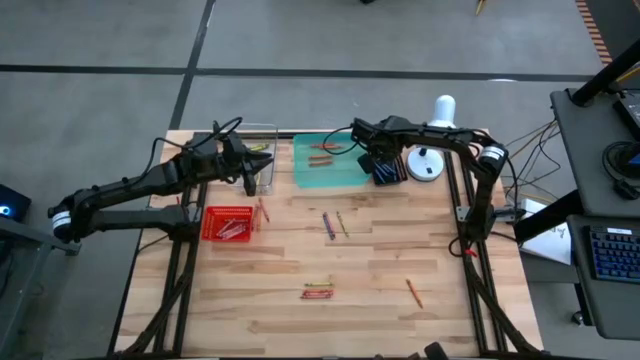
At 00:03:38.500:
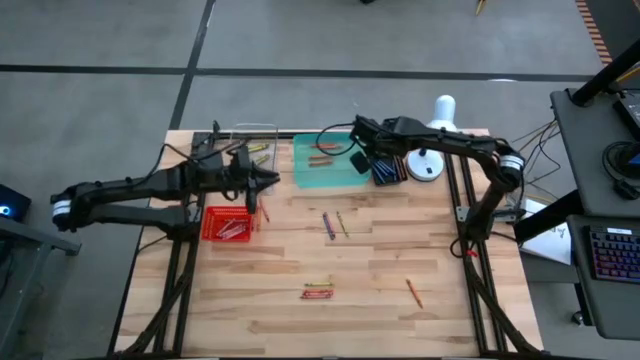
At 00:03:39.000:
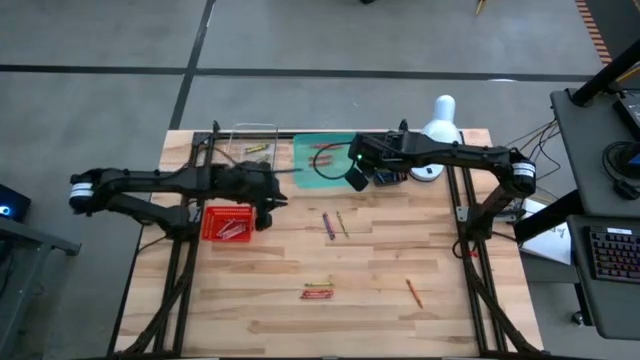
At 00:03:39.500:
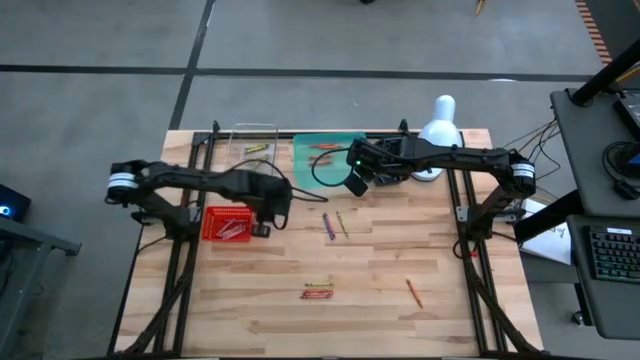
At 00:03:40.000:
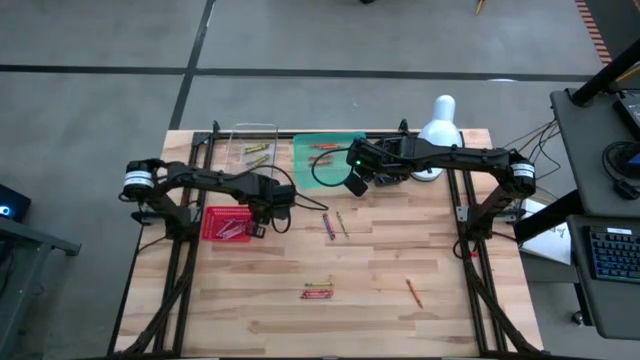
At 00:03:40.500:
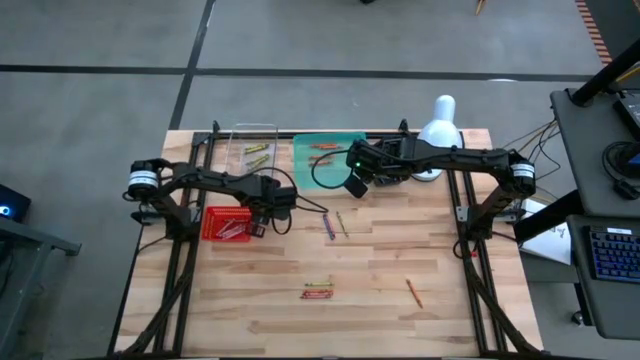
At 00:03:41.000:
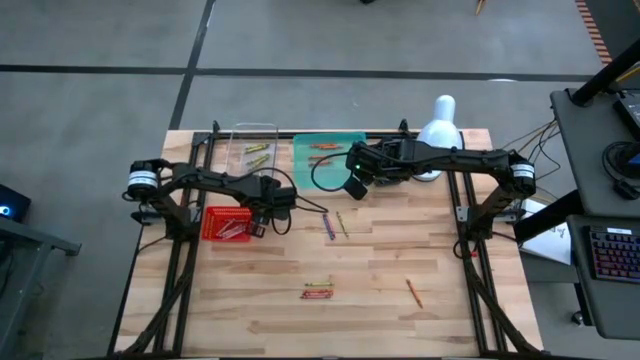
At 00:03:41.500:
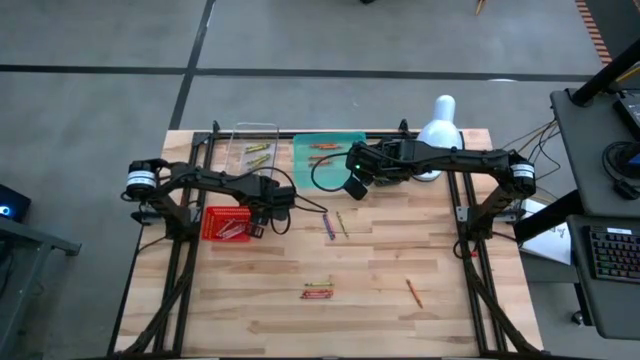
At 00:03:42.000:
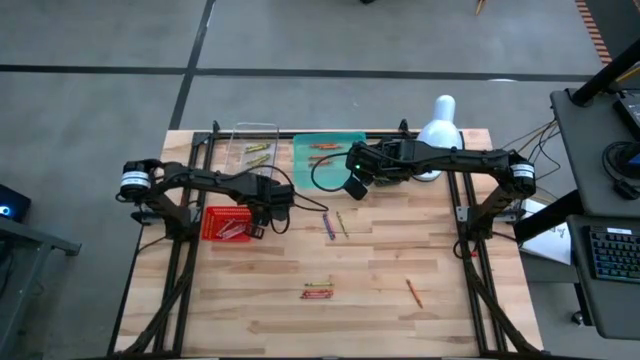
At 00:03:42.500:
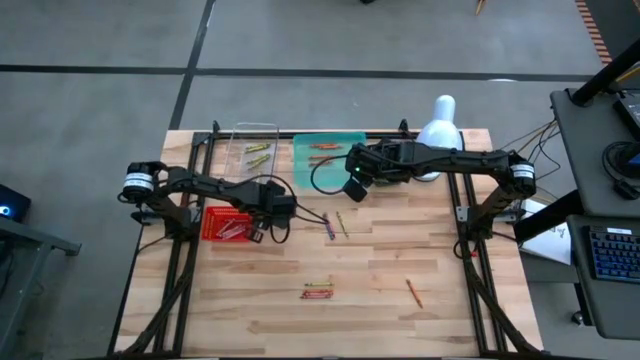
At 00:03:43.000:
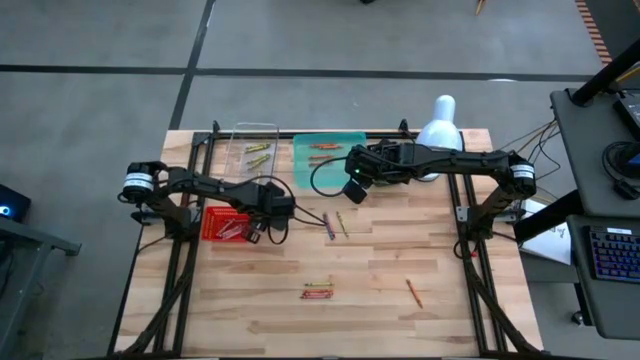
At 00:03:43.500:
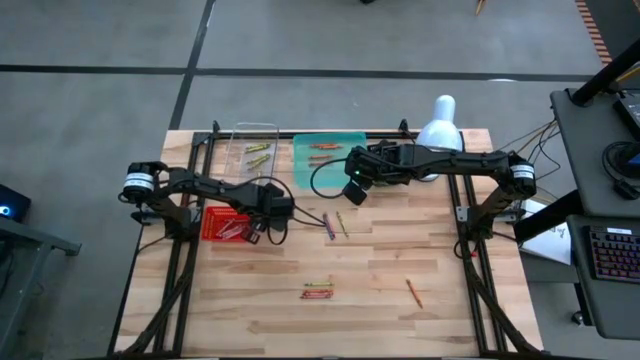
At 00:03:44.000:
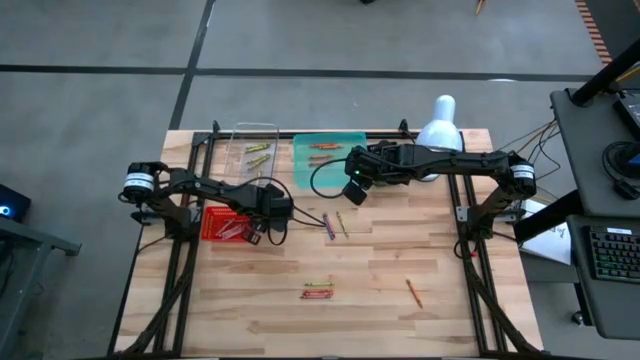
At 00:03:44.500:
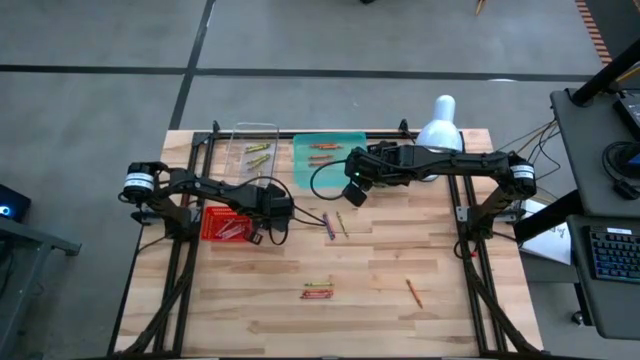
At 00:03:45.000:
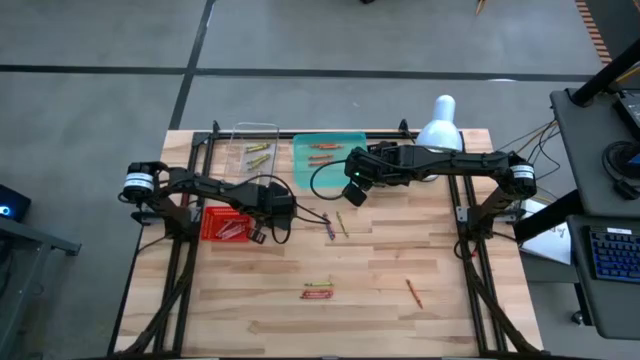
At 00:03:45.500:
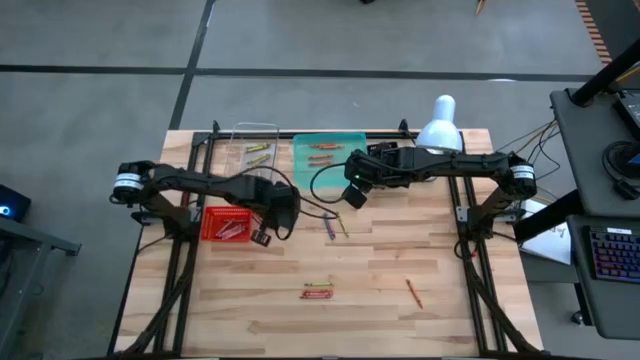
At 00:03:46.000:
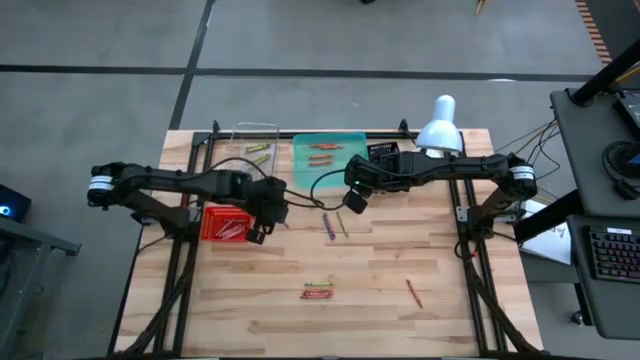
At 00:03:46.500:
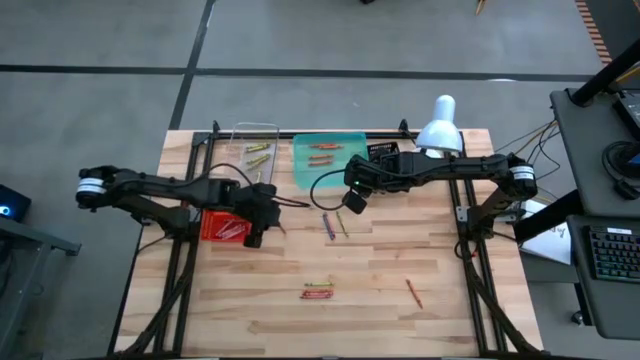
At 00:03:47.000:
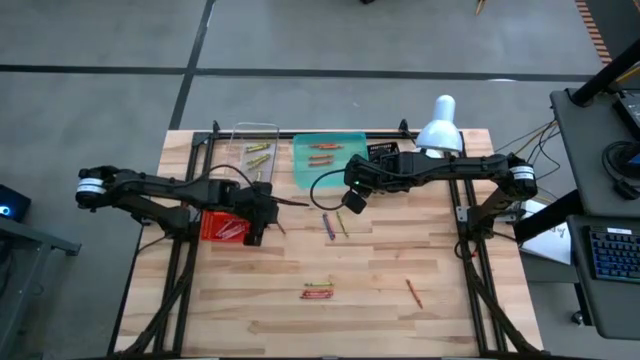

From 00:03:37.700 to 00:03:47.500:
Task: Sort crayons
Put the red crayon into the red bin

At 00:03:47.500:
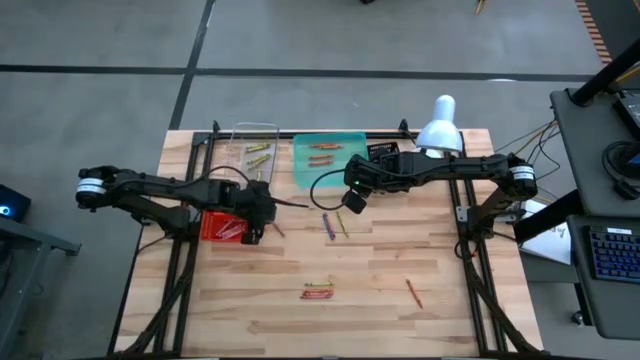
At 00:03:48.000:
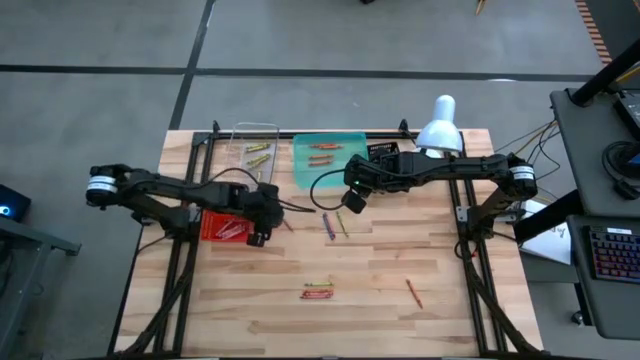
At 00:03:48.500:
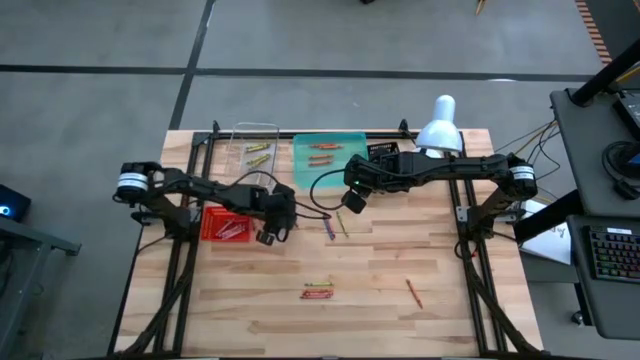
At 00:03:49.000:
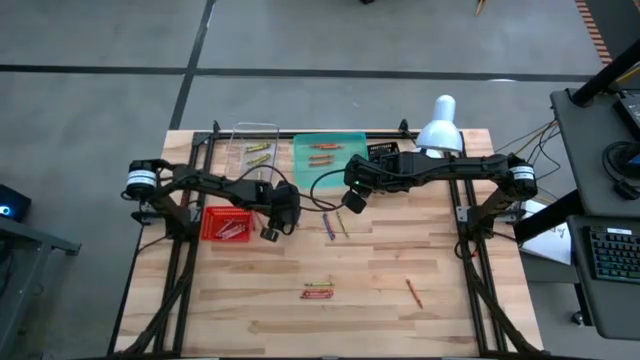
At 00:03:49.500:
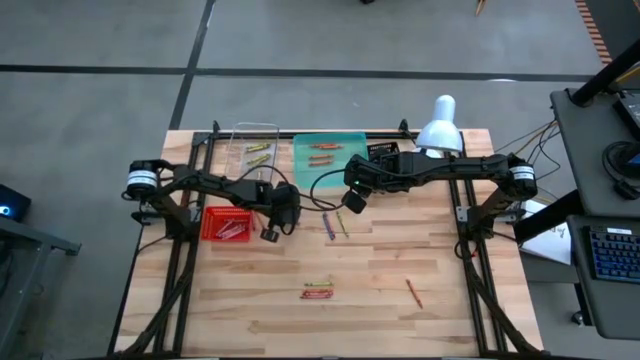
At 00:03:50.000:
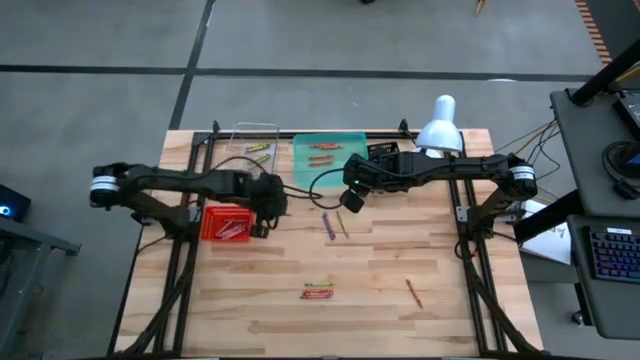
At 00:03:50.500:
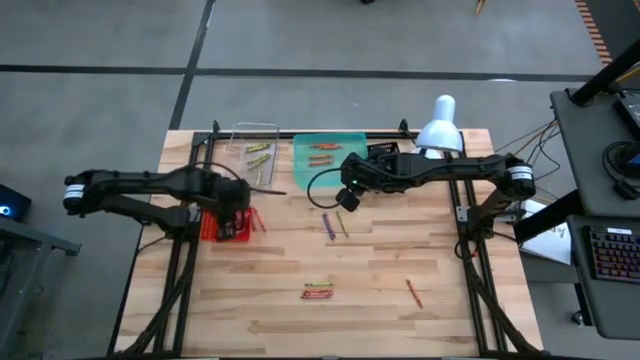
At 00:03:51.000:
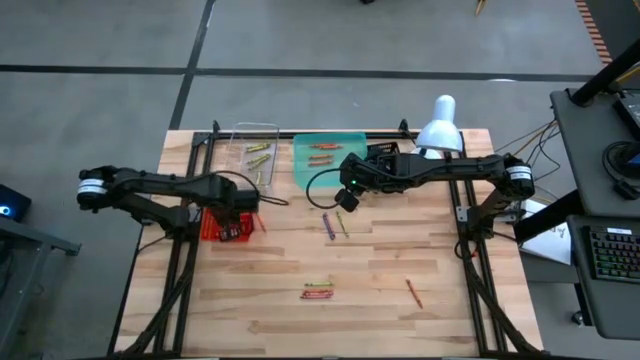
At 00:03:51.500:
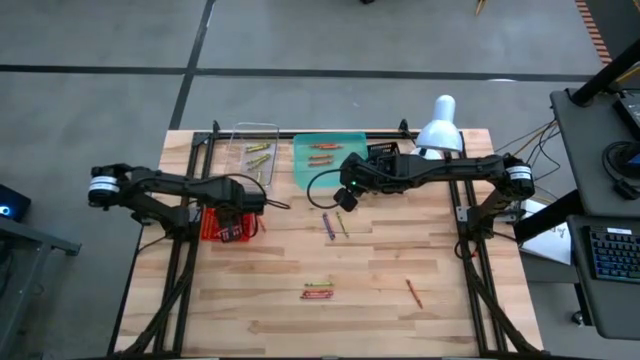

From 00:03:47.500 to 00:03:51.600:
Put the red crayon into the red bin

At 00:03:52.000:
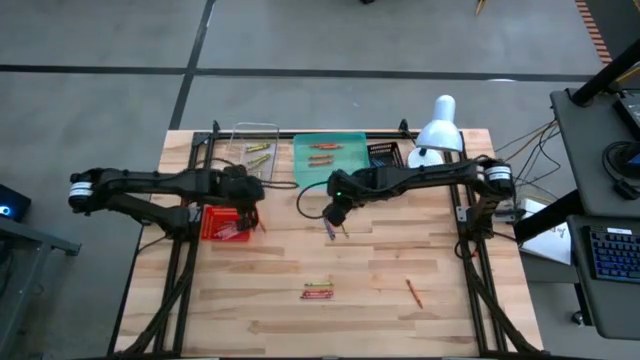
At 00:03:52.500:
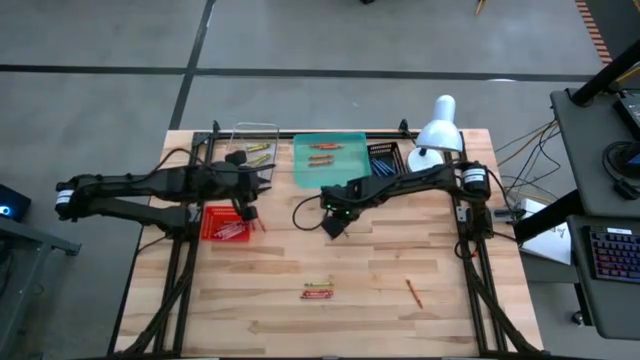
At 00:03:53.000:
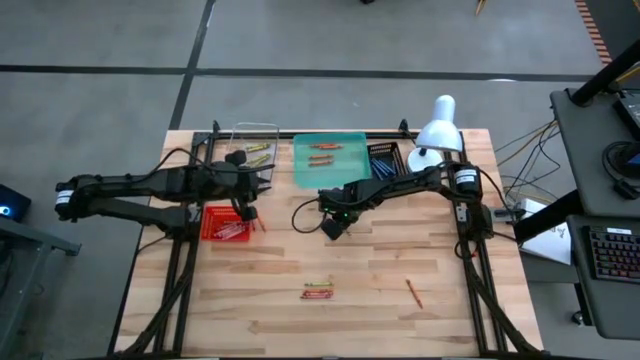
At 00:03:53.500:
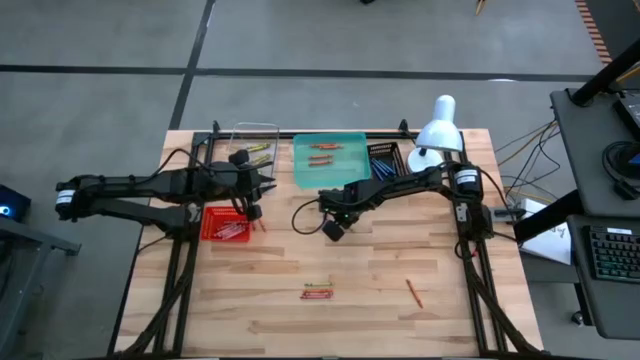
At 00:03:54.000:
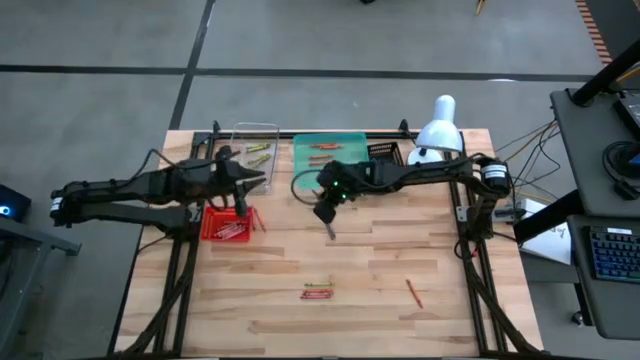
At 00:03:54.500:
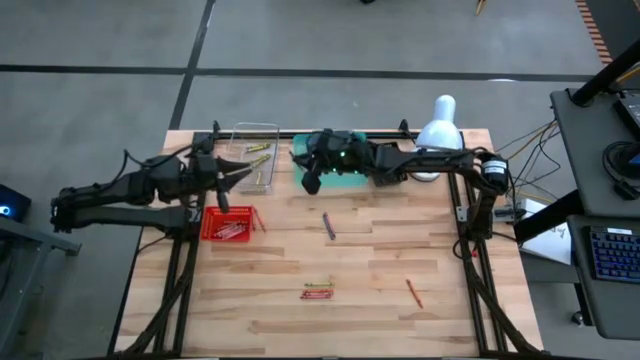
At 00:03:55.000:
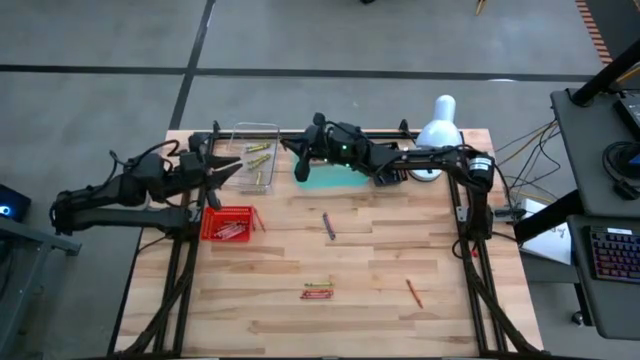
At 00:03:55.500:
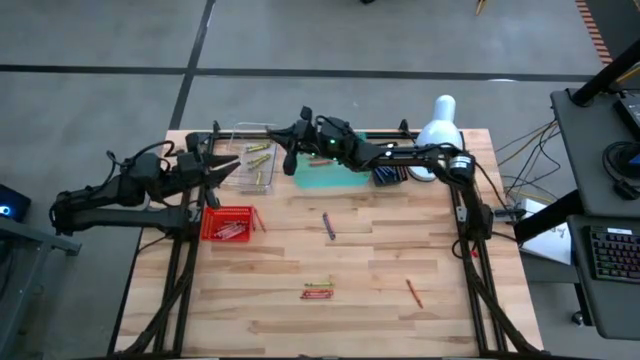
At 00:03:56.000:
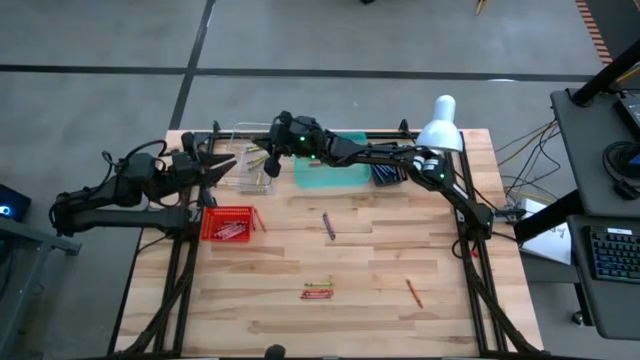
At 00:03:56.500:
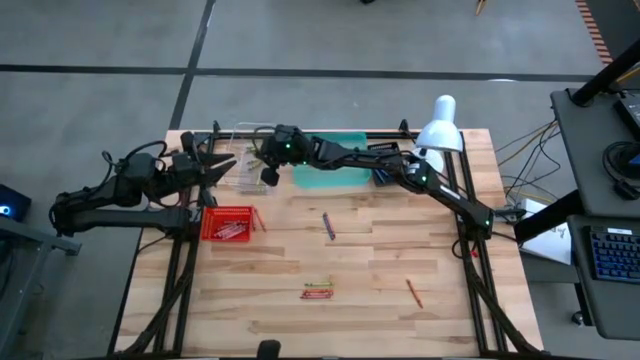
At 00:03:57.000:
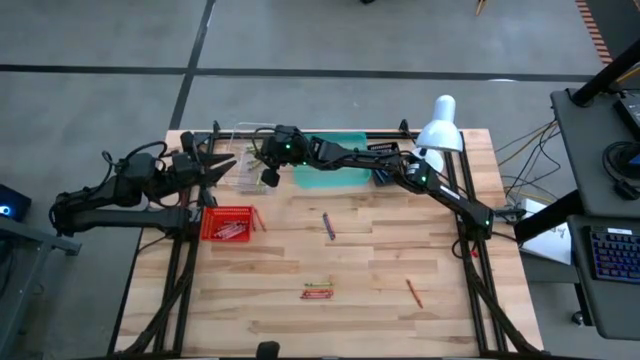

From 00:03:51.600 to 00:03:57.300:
Put the green crayon into the transparent bin

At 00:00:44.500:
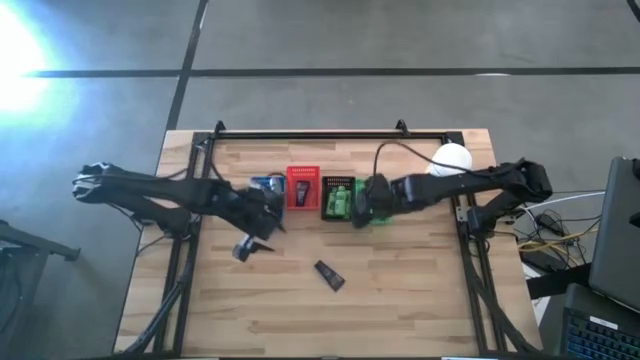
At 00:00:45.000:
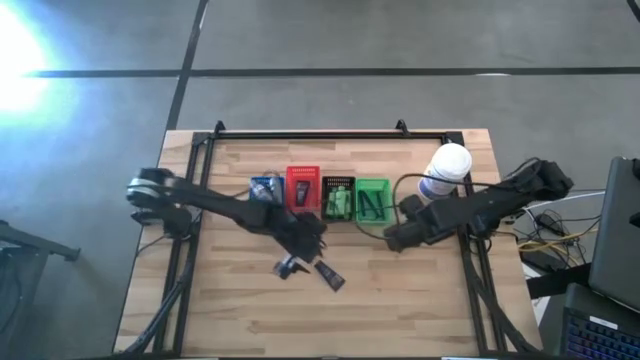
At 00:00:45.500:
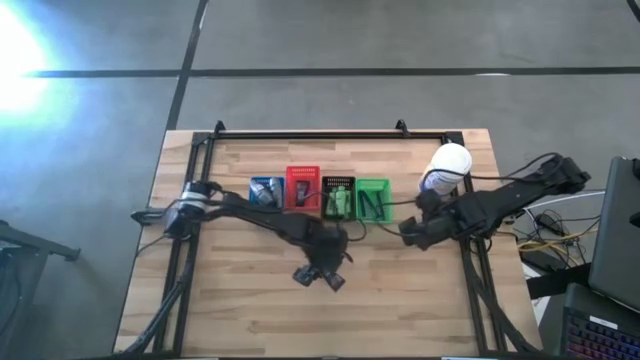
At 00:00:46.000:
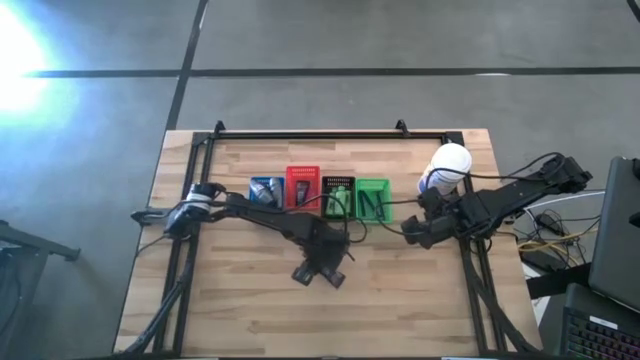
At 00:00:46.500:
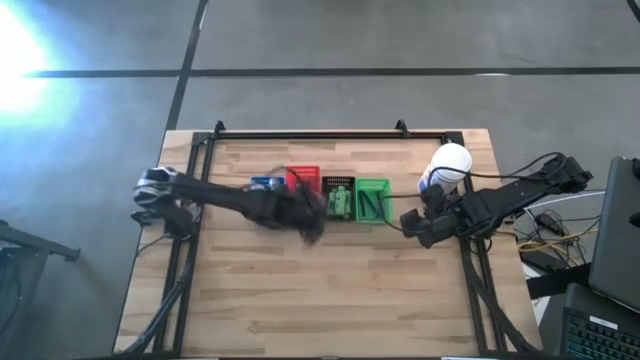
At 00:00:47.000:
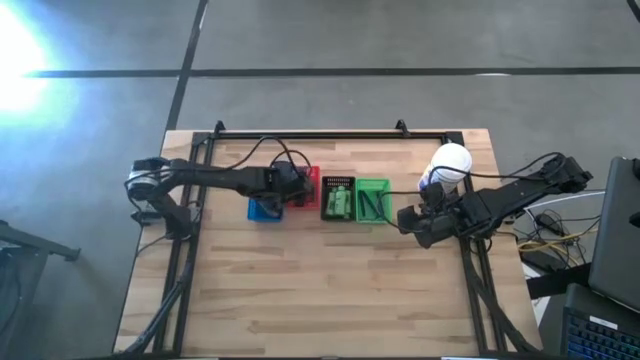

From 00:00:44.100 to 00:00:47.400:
Task: Pick & Place Travel size toiletries
Put the blue shaving cream into the red bin
